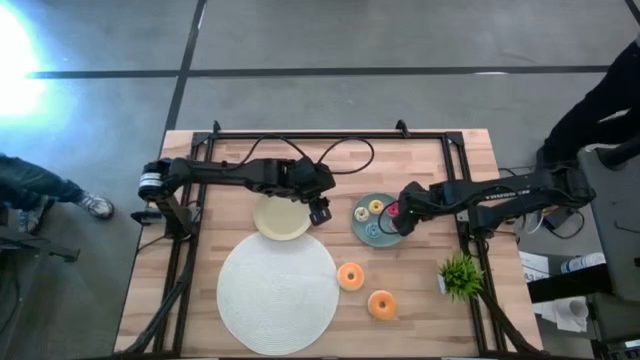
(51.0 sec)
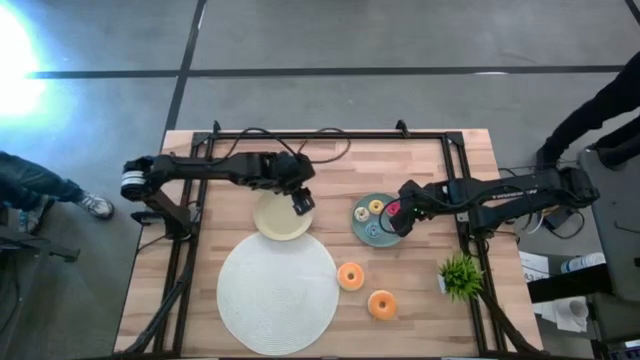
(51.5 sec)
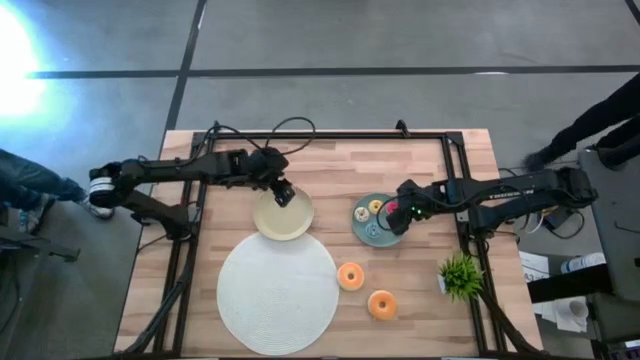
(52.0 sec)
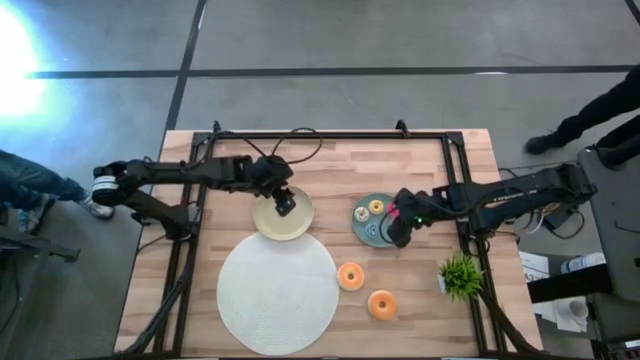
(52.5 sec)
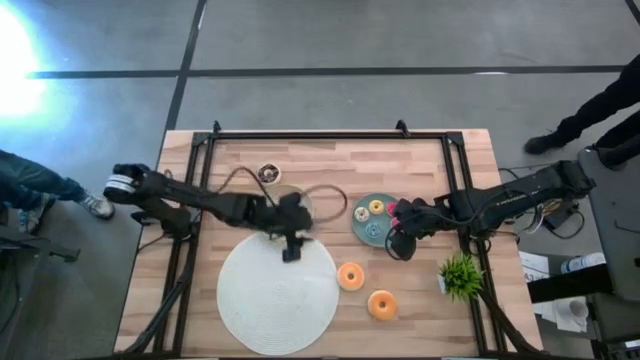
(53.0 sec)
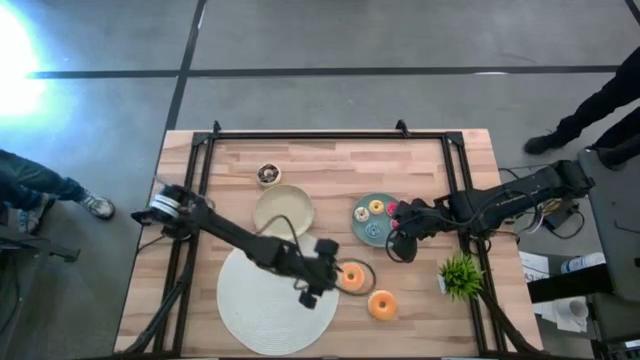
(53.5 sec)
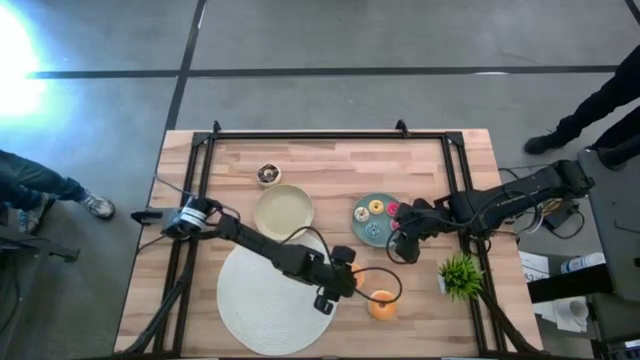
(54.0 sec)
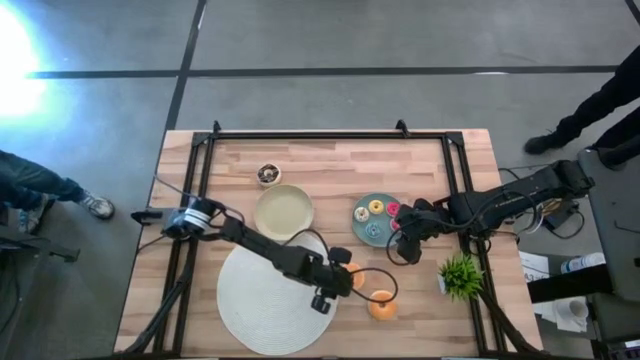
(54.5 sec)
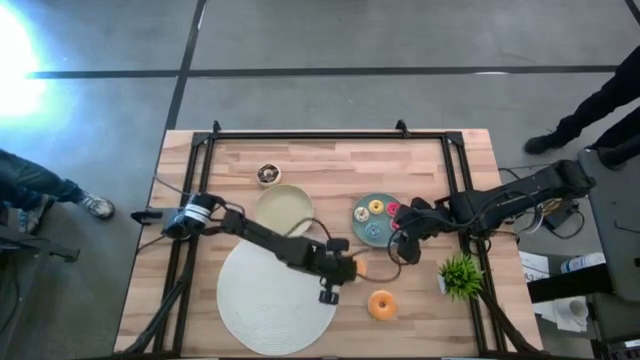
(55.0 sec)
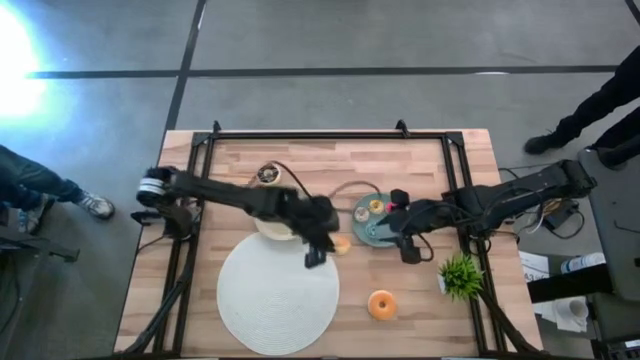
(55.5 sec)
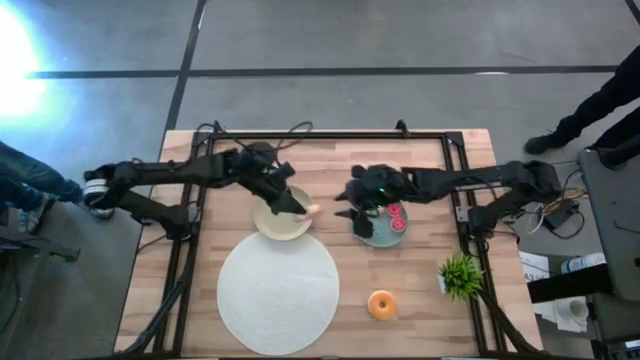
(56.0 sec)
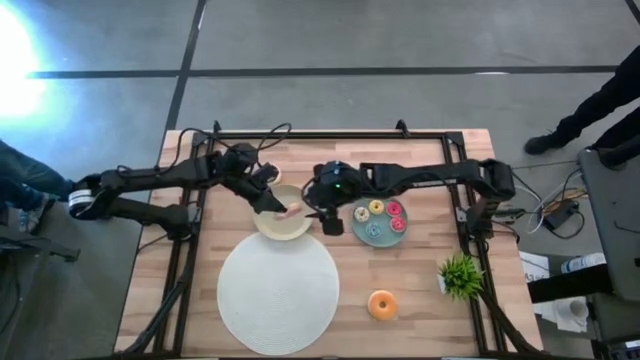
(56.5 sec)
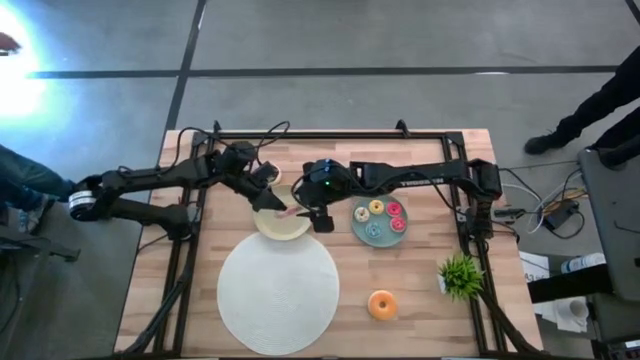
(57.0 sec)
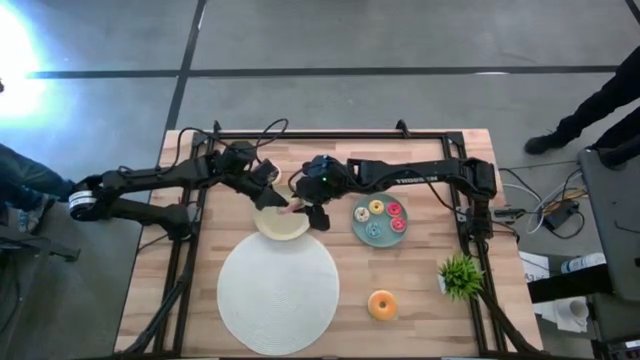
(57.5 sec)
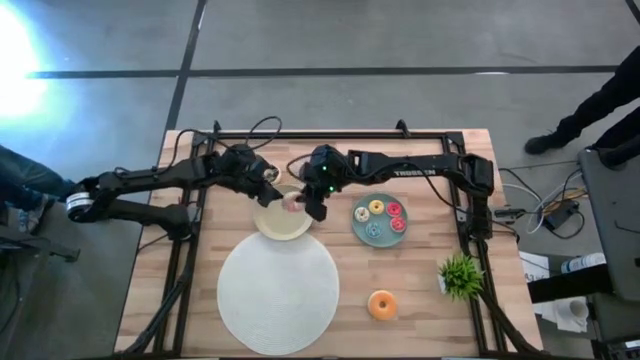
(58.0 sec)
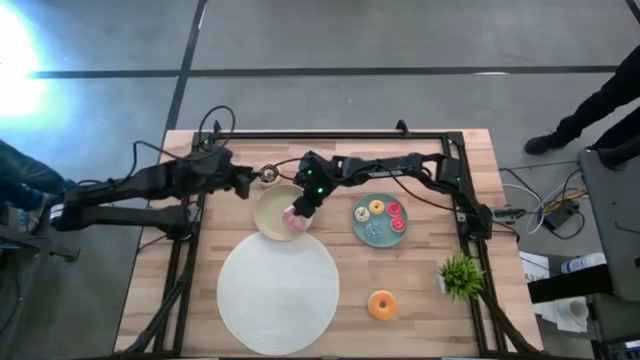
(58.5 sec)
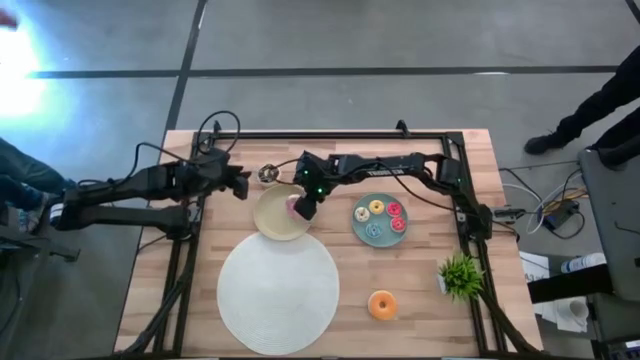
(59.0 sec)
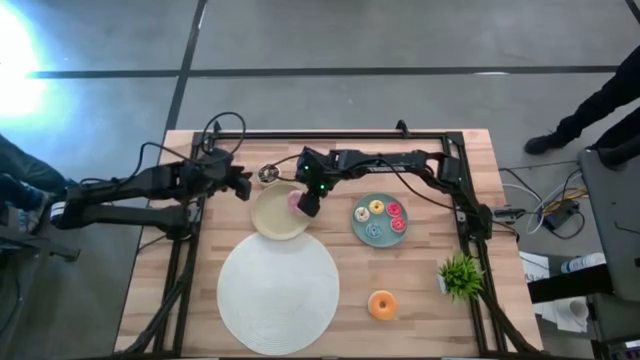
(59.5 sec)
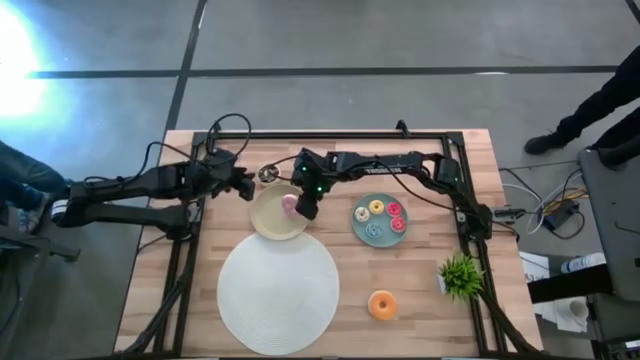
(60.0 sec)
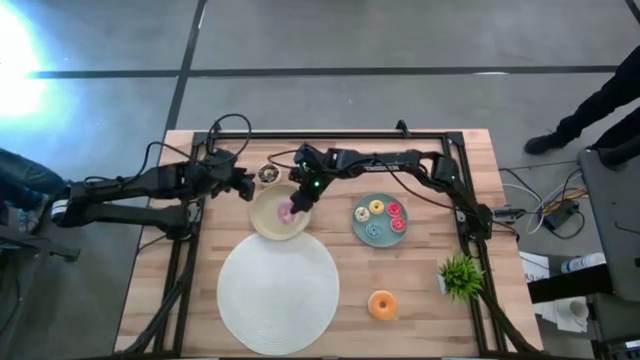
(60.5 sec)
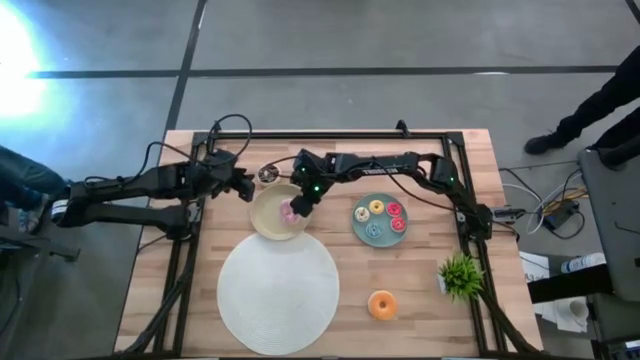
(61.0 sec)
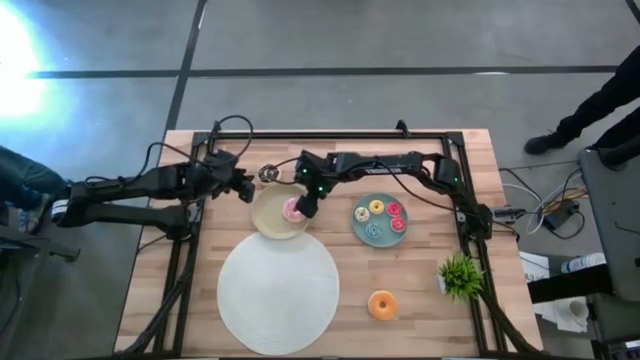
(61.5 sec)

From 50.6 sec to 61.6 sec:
Task: Pick & Place donuts
Put the pink donut on the brown plate

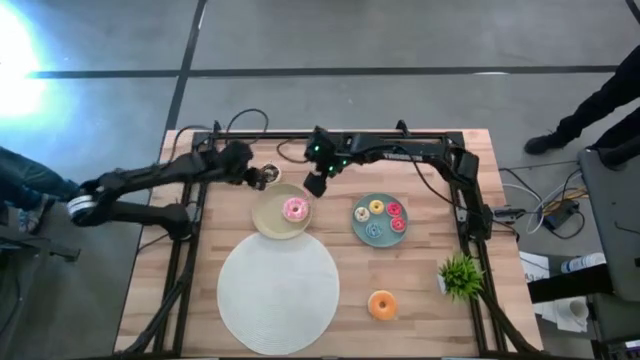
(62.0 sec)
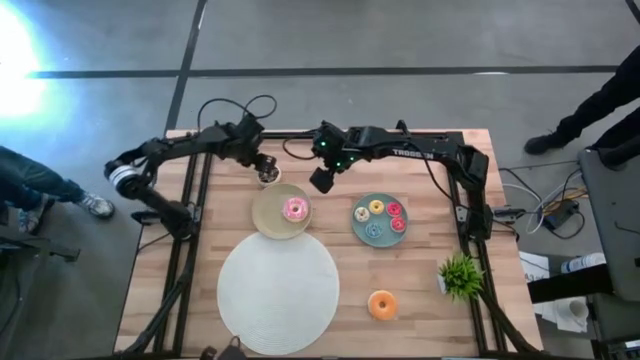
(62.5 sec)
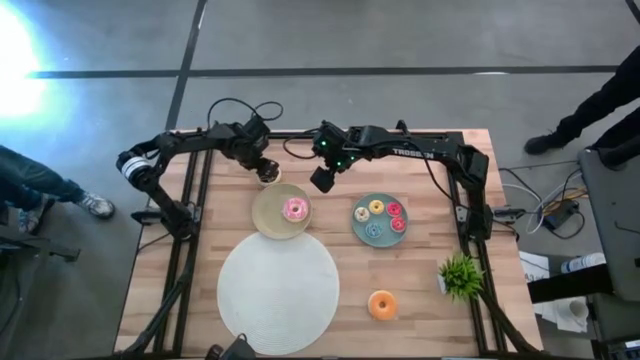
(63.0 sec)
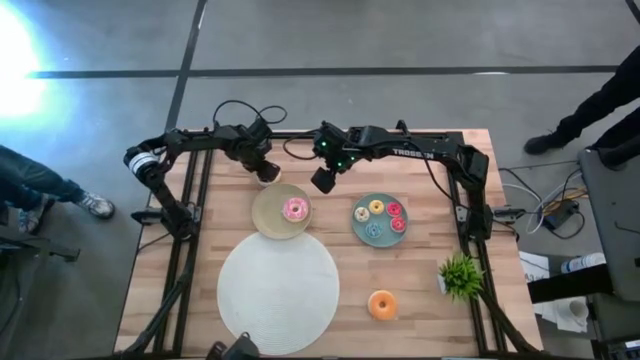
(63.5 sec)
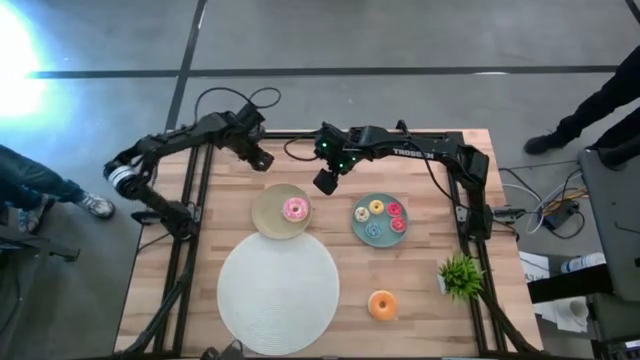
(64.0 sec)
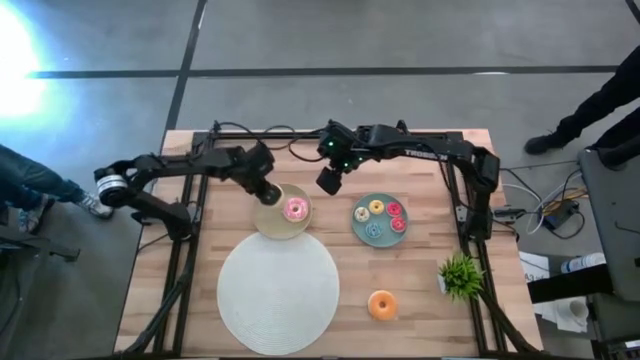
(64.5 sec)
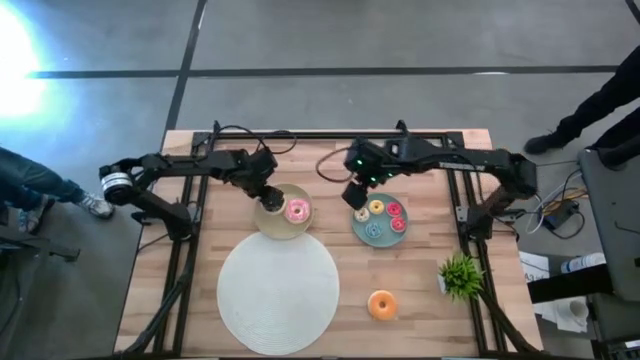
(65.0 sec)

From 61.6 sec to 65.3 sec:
Put the black donut on the brown plate

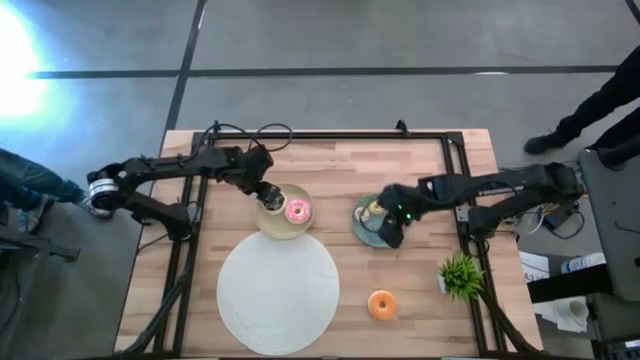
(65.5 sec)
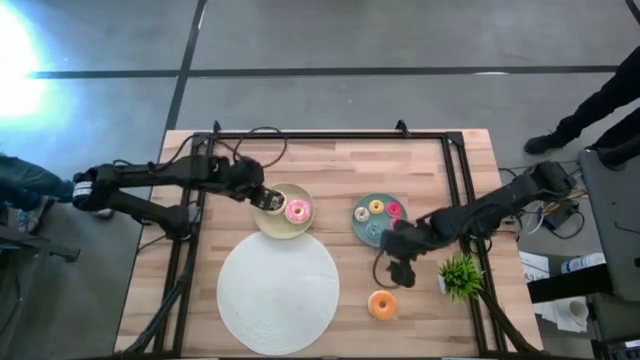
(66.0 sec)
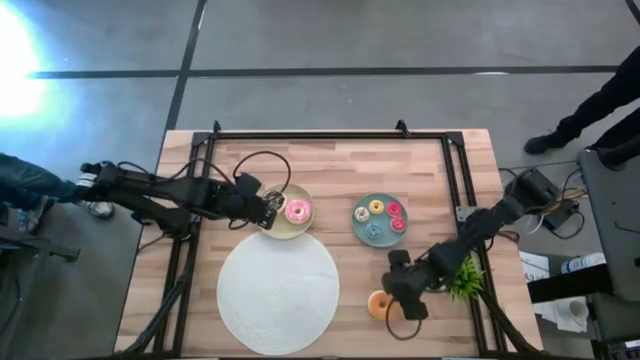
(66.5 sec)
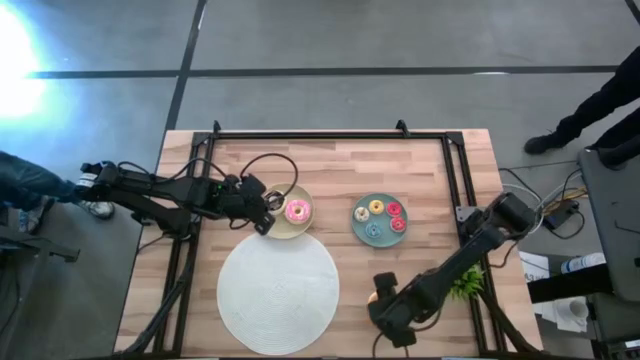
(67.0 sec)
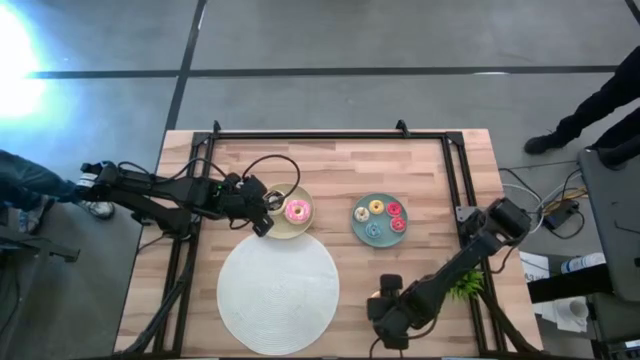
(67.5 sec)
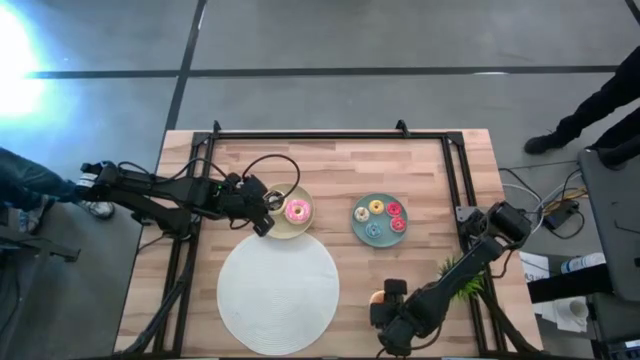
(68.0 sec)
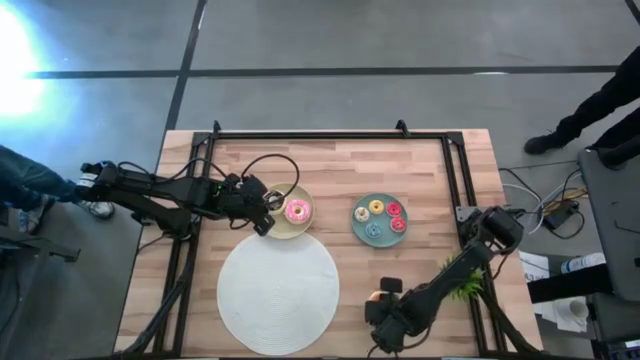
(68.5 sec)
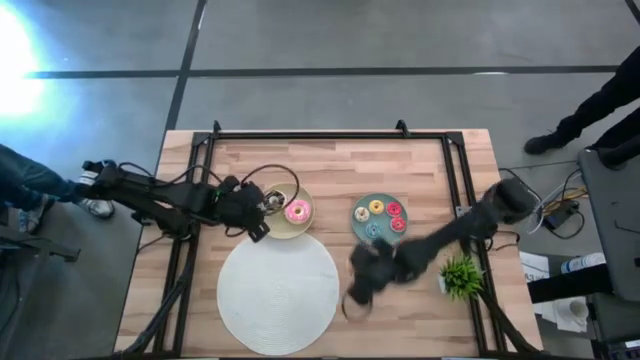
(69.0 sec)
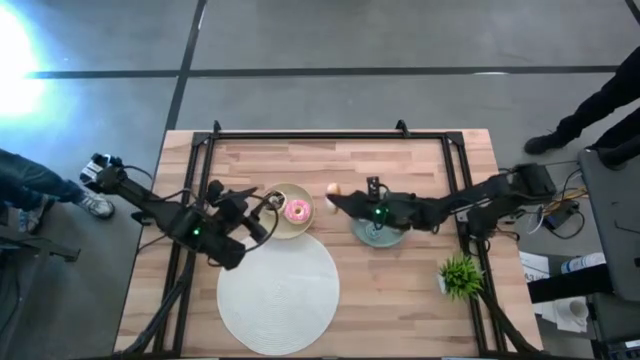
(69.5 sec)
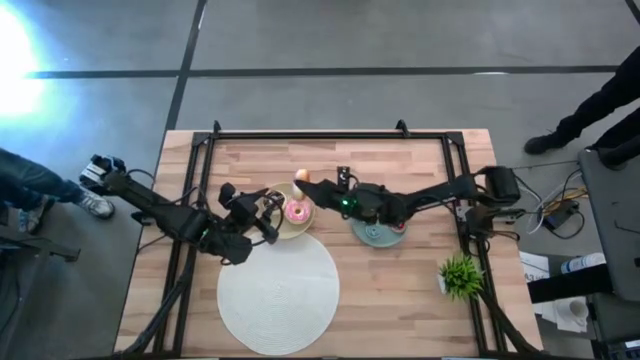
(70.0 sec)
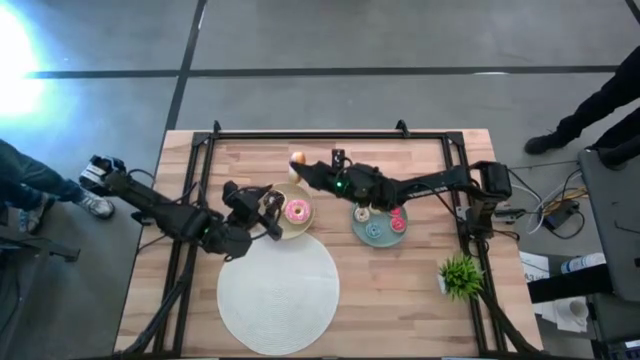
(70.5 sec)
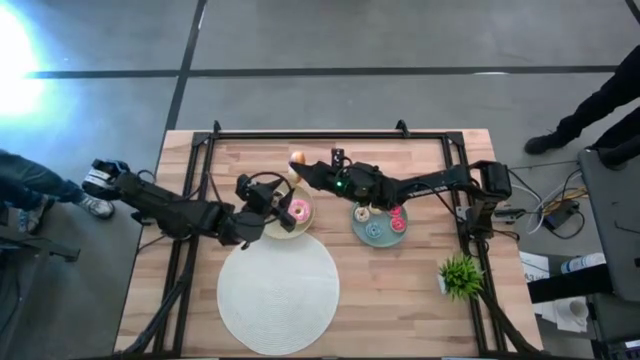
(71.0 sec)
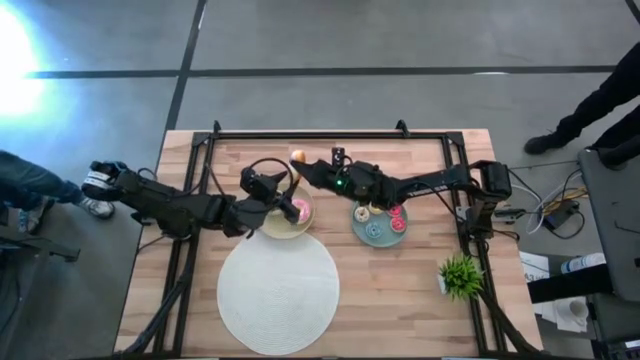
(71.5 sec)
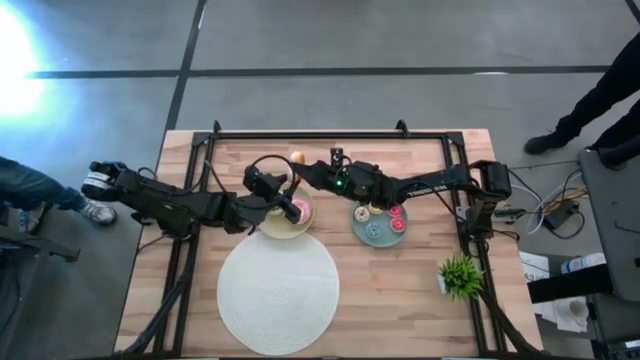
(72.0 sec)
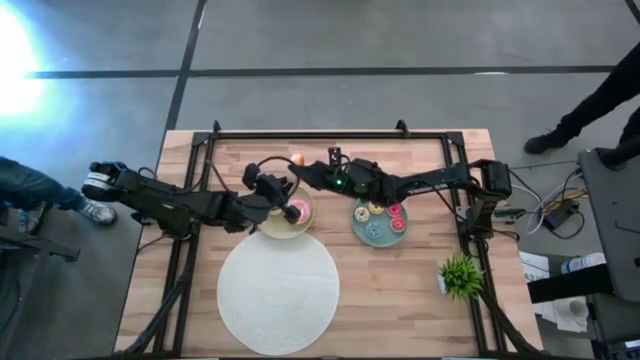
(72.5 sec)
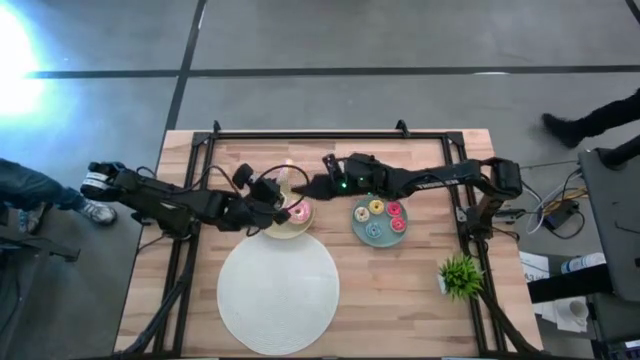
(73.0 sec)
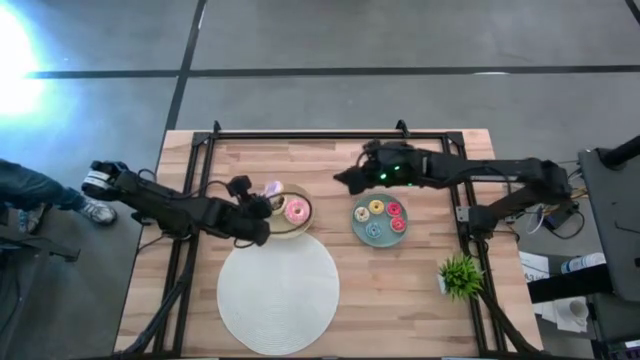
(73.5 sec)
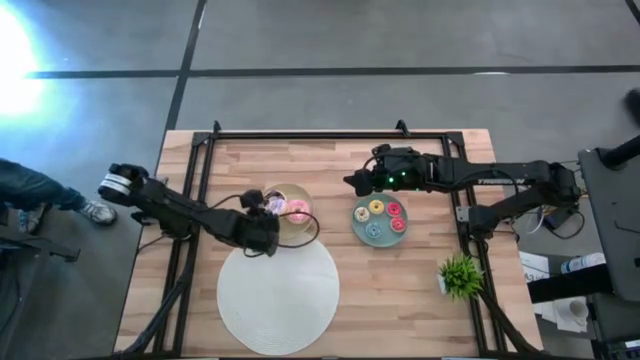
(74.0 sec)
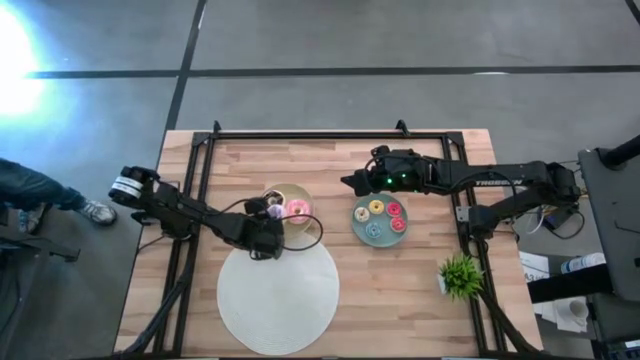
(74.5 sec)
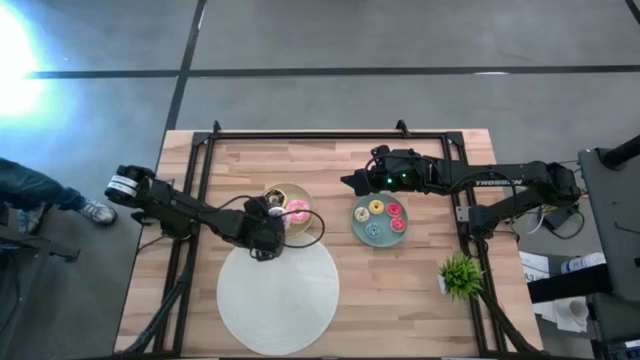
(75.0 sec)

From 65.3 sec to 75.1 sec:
Put the purple donut on the brown plate
